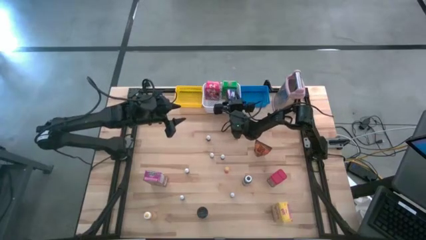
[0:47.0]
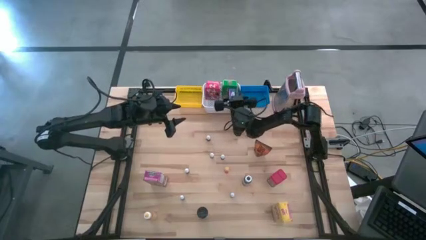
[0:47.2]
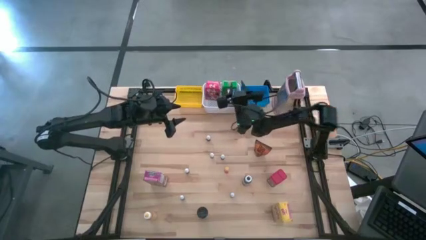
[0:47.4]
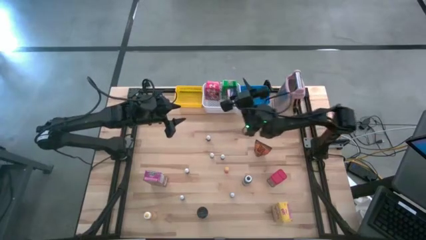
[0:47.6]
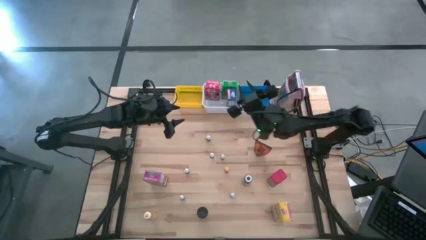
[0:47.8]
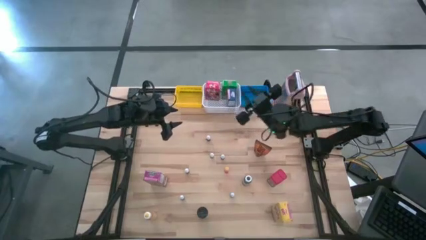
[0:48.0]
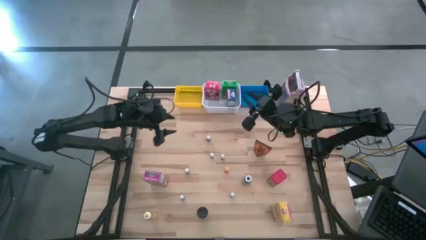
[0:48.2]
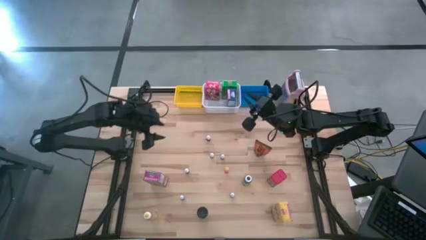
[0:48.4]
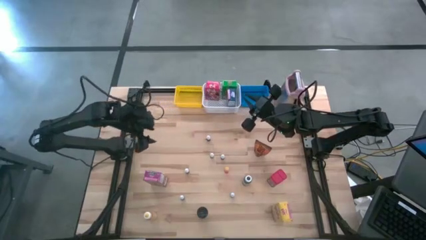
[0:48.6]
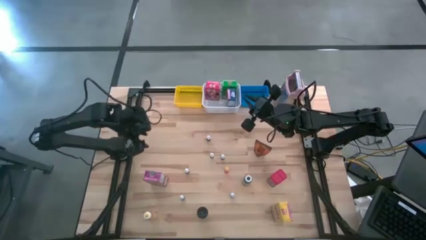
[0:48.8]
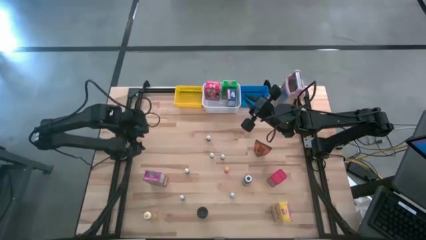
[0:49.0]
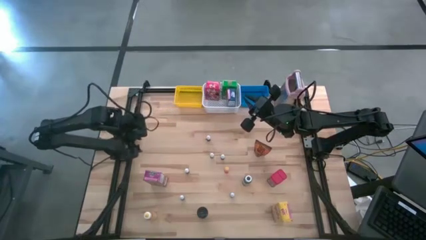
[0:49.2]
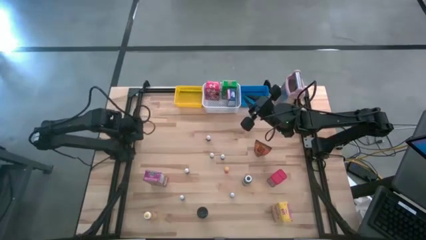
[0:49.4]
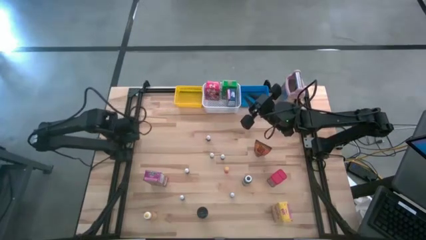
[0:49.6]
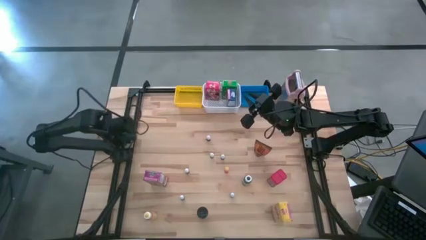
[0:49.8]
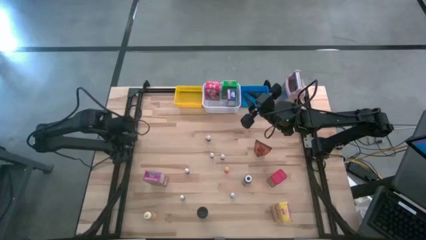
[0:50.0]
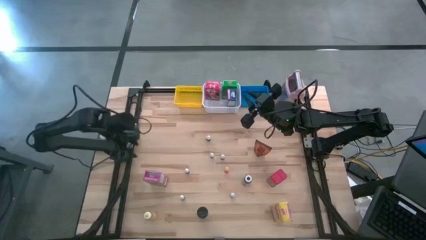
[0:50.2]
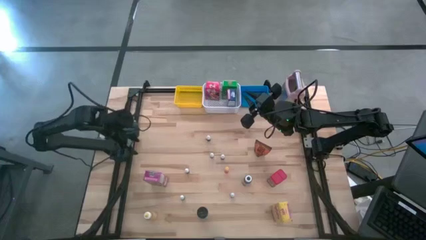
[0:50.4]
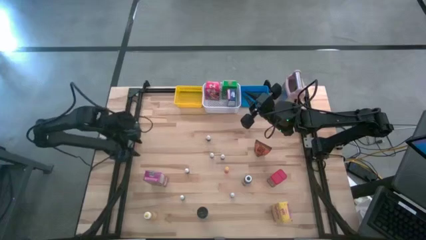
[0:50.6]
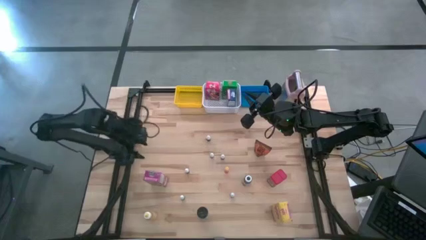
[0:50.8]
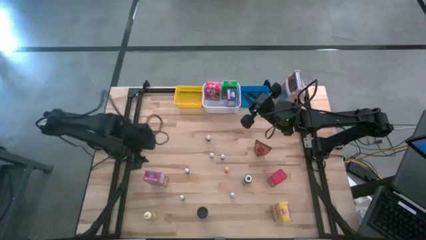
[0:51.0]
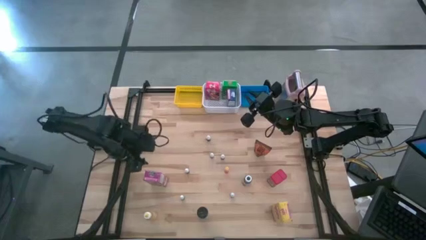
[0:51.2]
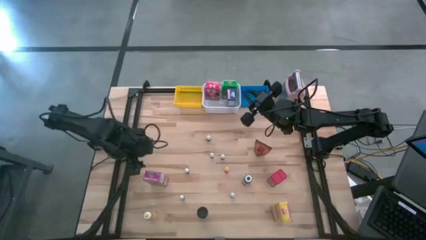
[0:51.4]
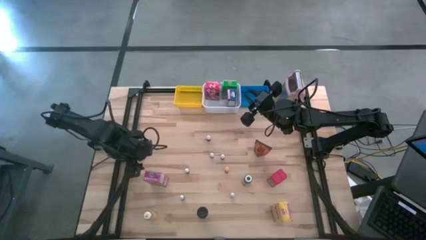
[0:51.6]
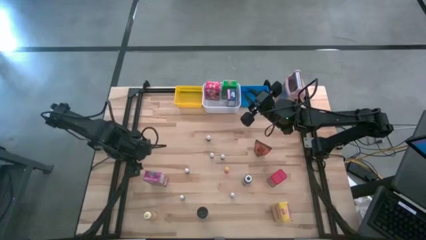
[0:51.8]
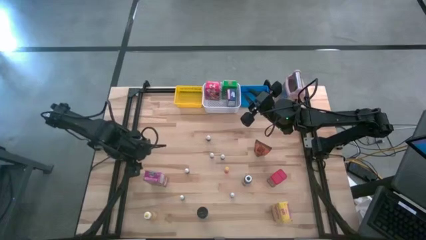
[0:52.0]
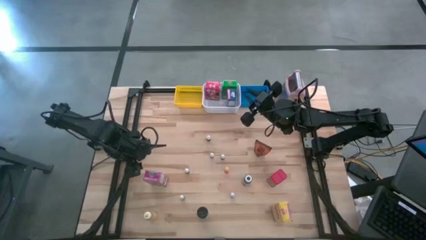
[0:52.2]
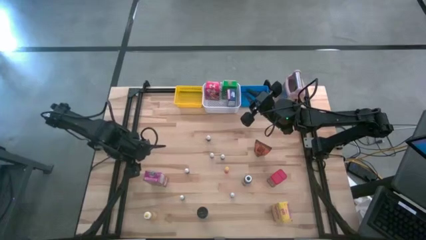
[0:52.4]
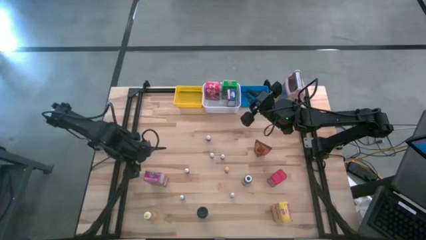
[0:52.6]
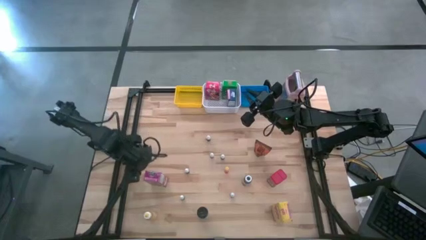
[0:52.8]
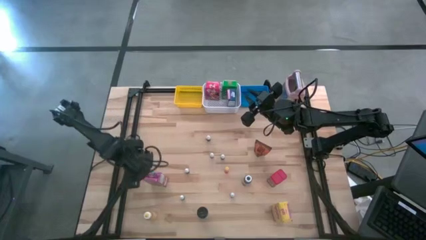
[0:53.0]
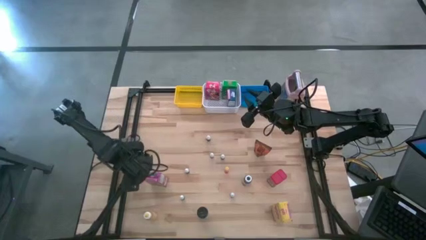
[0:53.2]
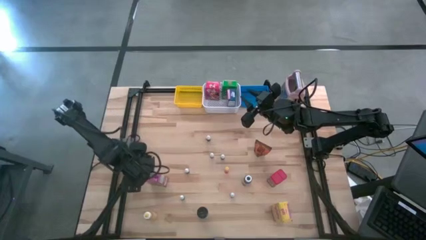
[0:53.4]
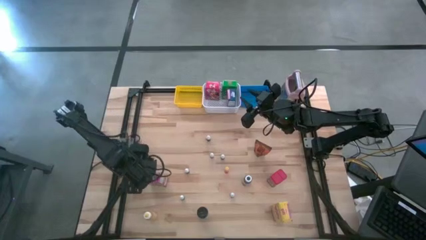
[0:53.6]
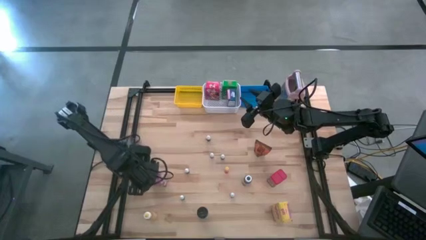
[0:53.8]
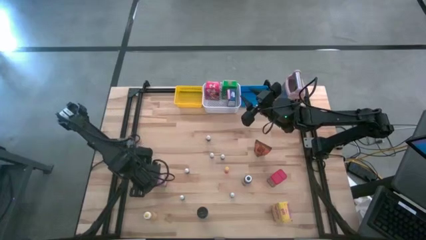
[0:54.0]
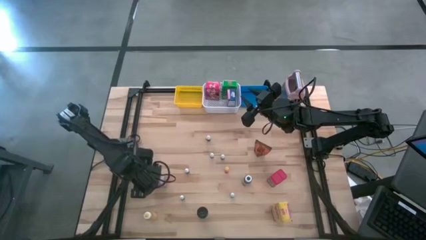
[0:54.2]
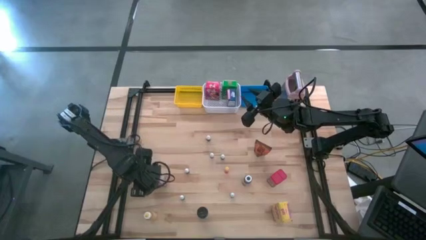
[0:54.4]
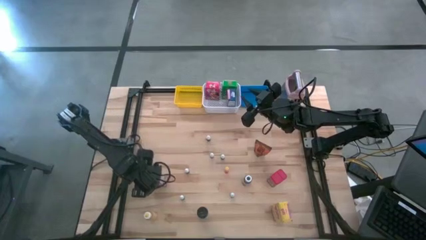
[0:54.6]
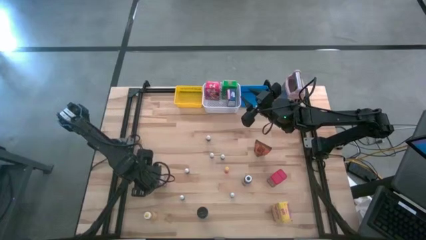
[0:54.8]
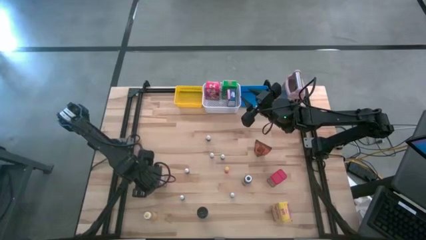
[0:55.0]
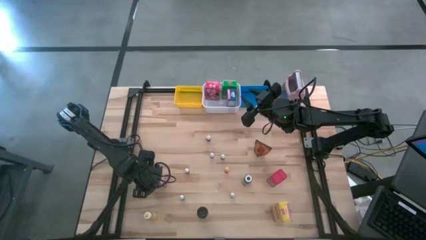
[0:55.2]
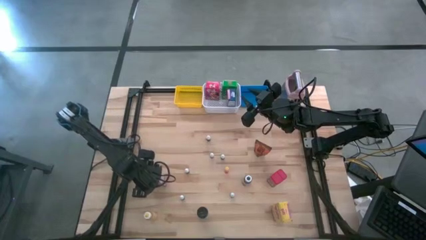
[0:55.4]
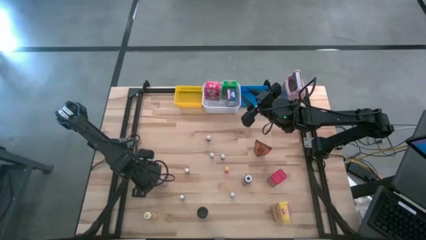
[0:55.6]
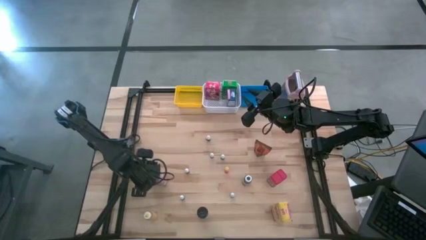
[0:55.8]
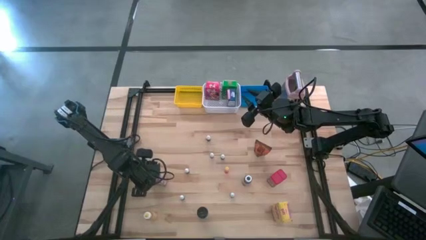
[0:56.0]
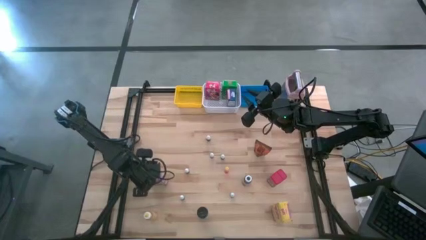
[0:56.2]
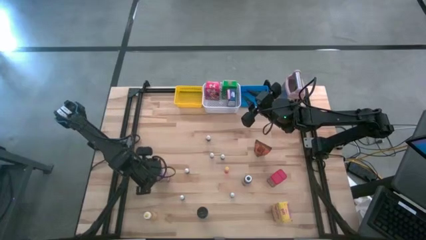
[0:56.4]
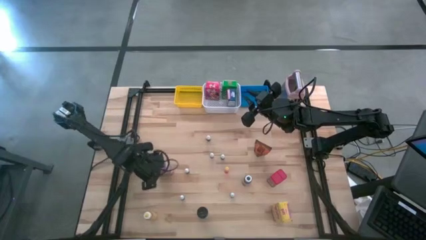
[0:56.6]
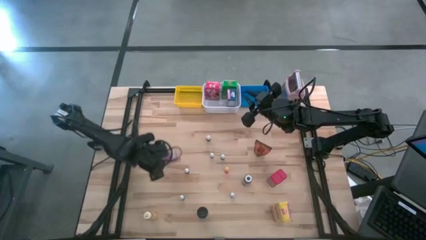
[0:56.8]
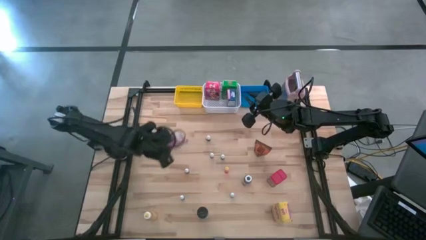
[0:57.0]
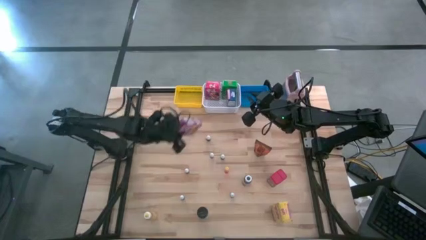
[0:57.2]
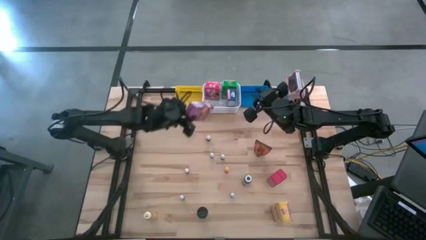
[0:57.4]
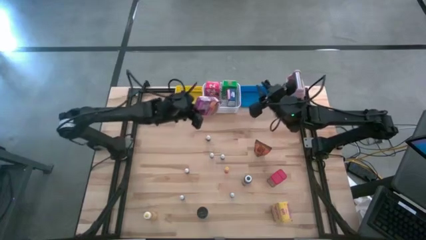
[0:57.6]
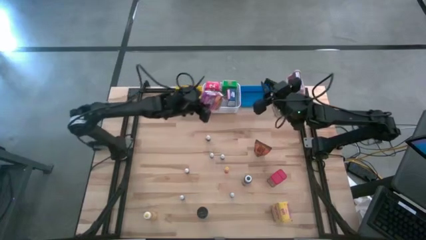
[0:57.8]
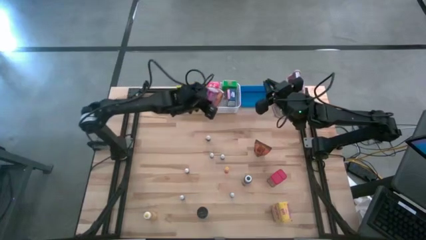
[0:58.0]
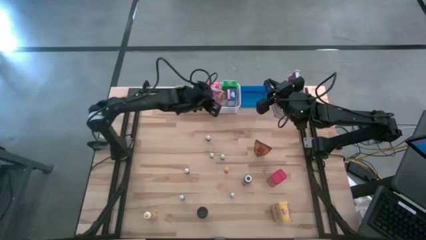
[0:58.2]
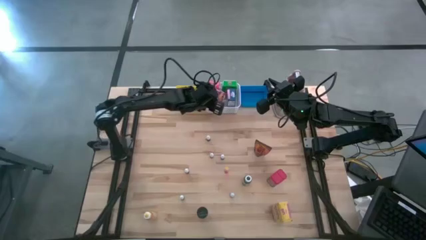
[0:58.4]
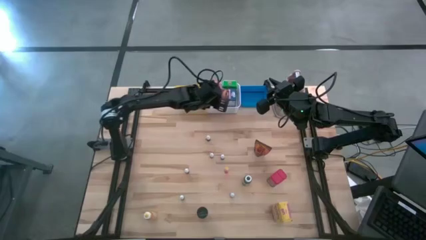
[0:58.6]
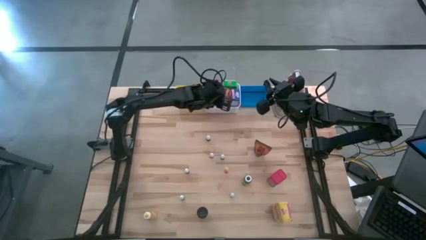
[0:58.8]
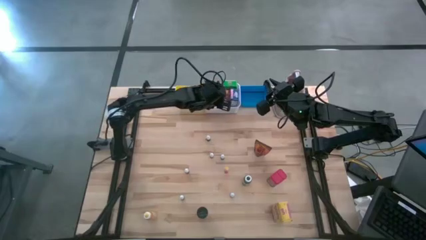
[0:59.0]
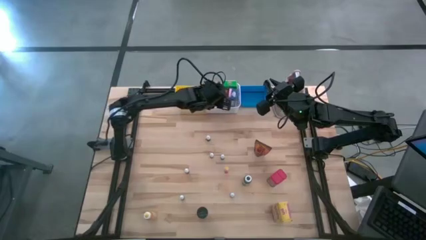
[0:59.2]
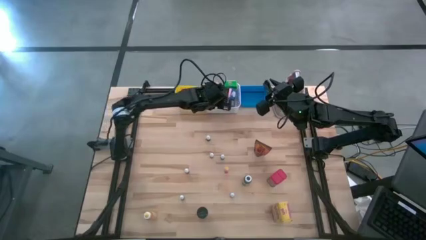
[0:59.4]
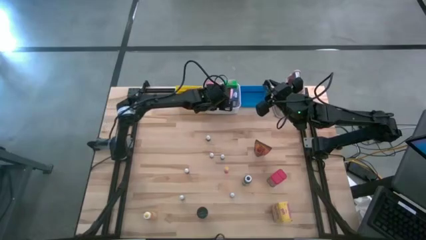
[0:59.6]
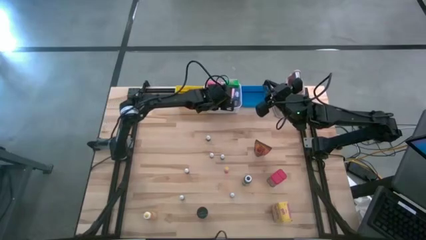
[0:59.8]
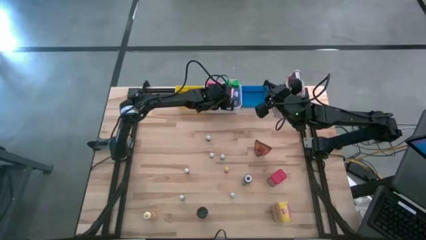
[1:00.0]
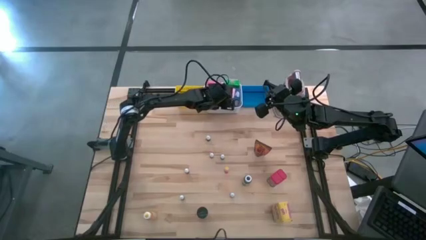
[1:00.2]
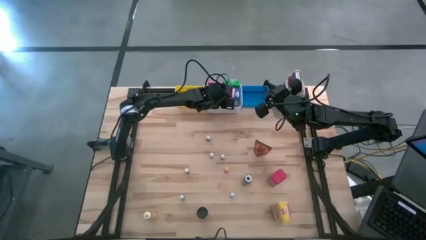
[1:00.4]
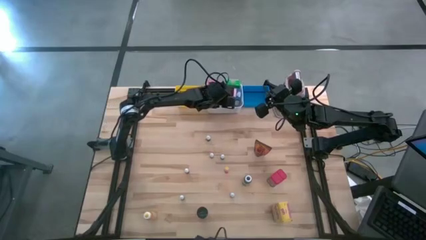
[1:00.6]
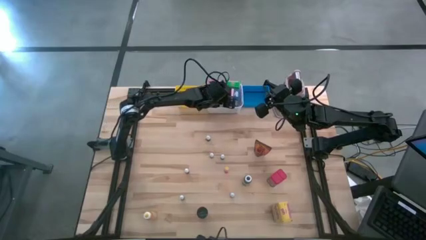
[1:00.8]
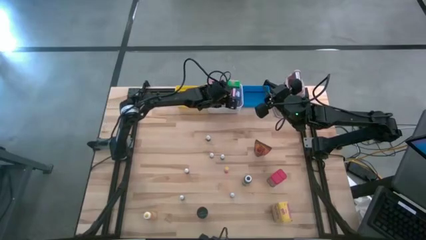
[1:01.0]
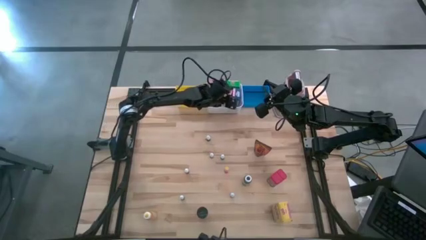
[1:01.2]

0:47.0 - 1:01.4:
Task: Pick & Place Kitchen Items
Put the purple cereal box into the white basket
